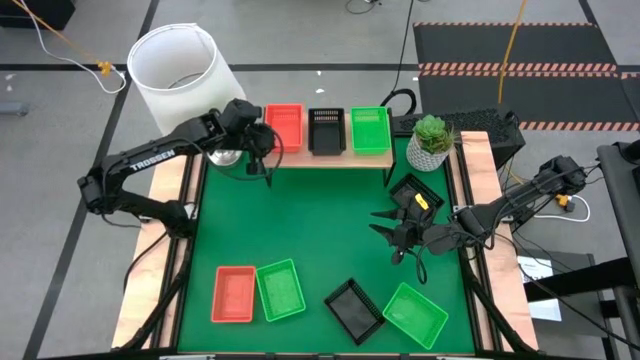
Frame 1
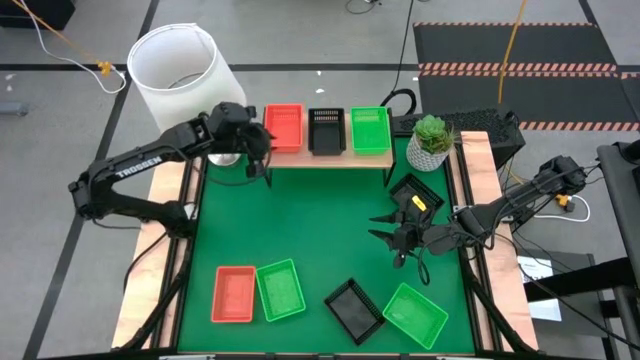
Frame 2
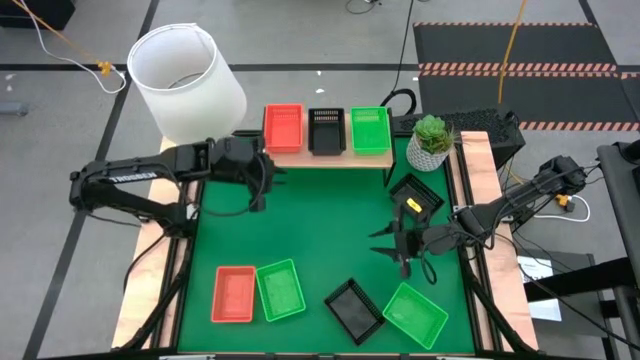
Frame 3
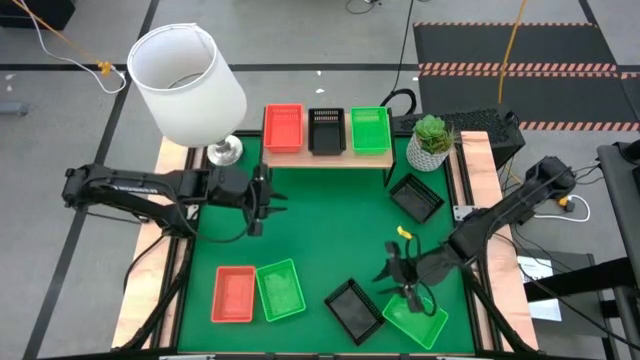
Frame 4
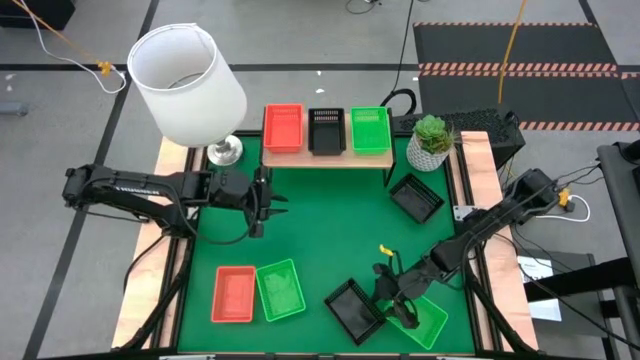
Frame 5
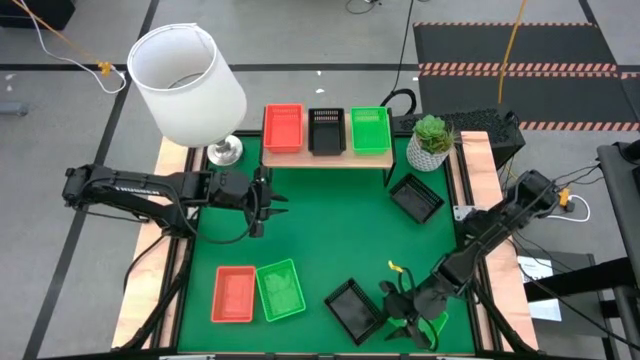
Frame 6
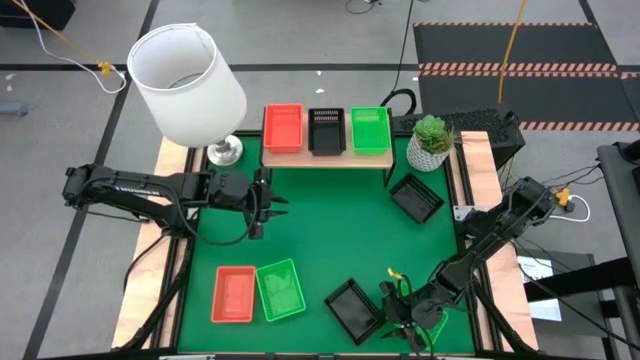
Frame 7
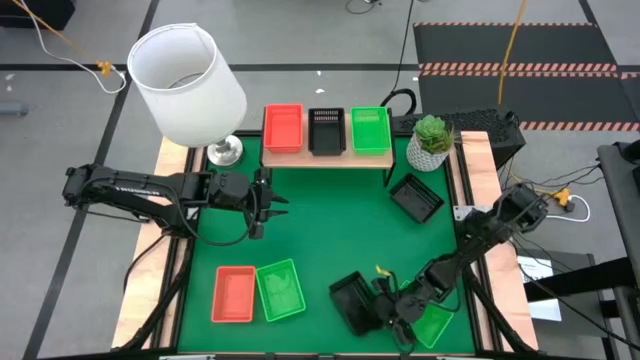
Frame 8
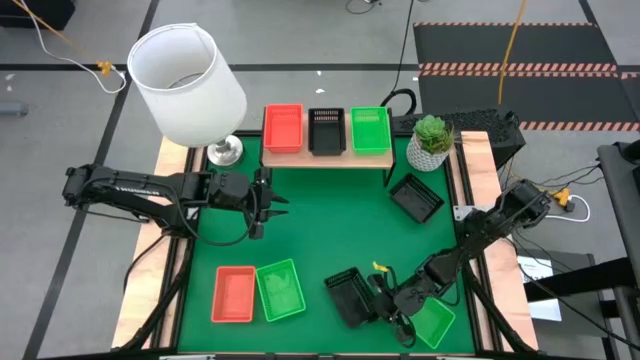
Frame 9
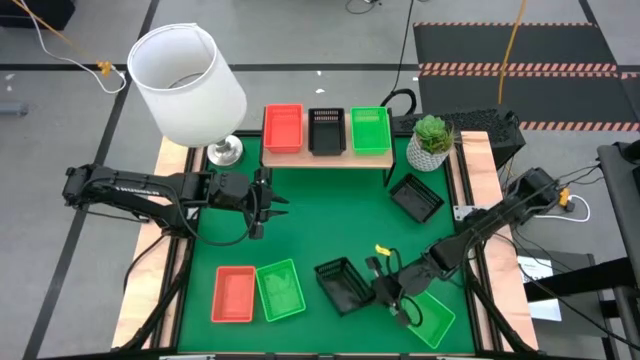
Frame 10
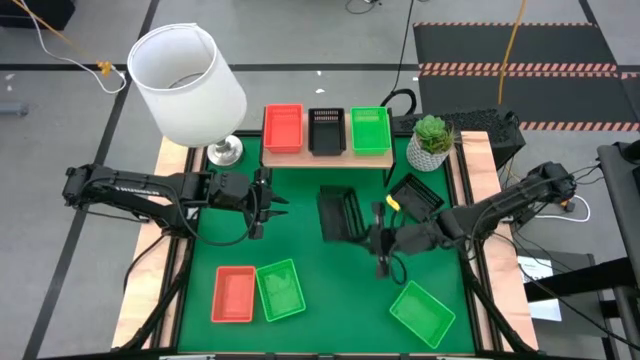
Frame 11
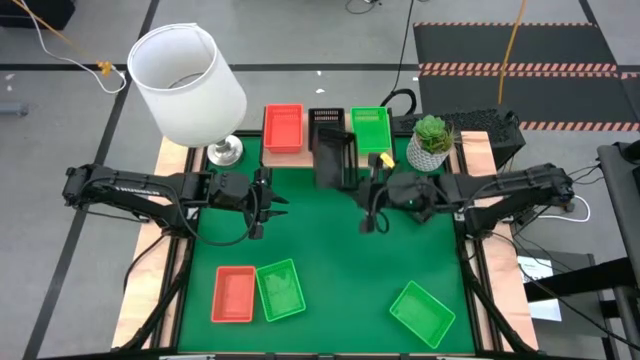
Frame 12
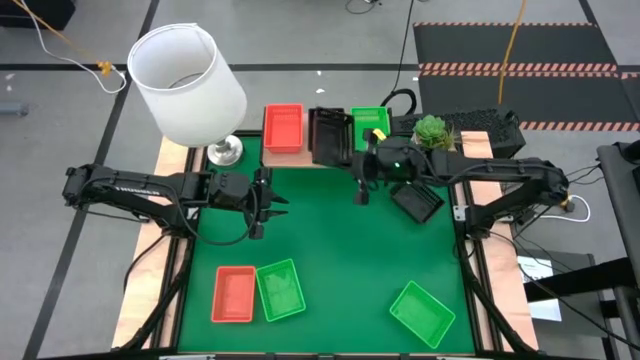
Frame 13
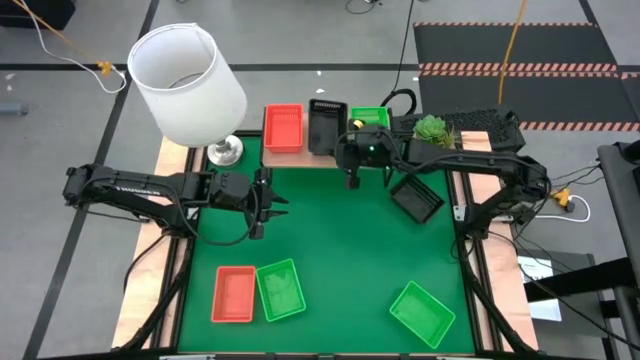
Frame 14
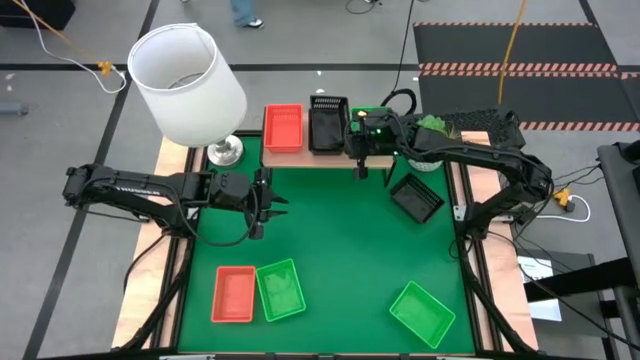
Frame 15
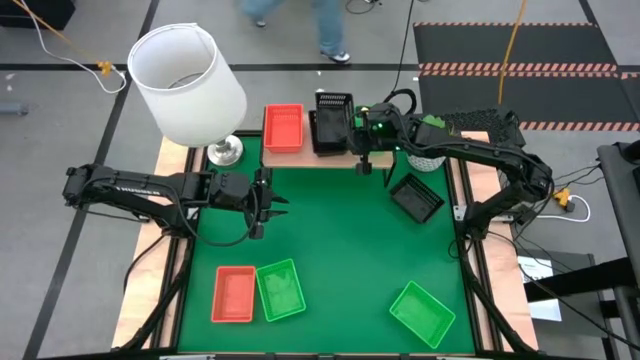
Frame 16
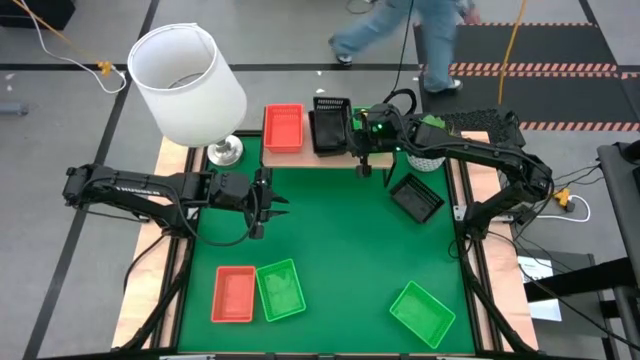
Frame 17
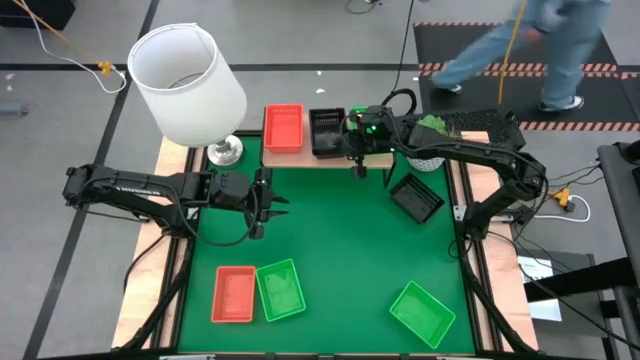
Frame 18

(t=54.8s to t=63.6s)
Task: Stack baskets on shelf by color
Stack the bottom black basket into the black basket on the shelf

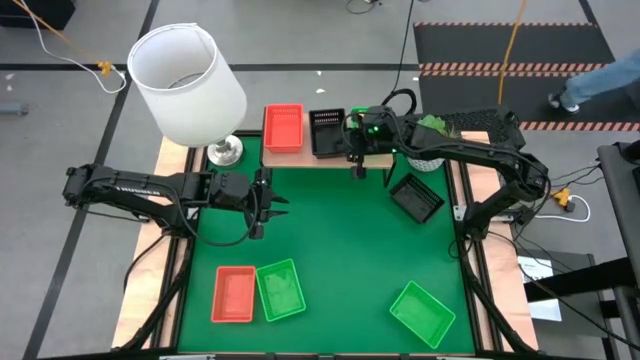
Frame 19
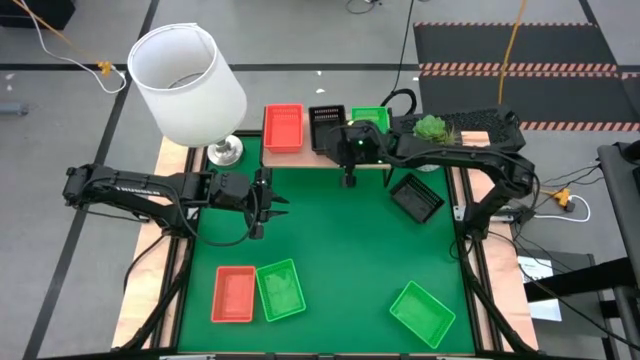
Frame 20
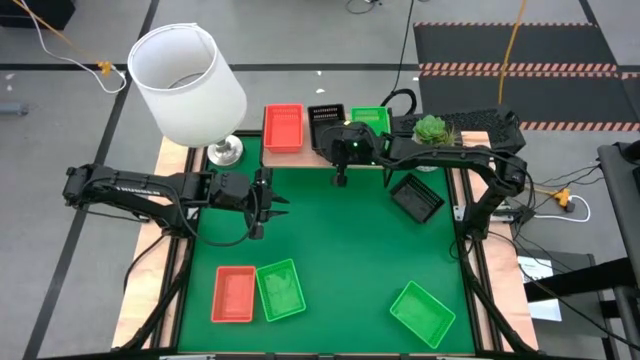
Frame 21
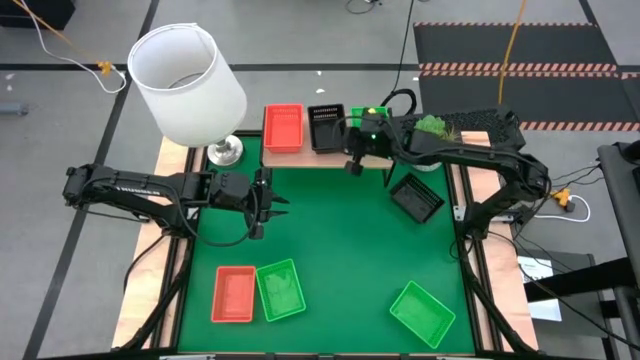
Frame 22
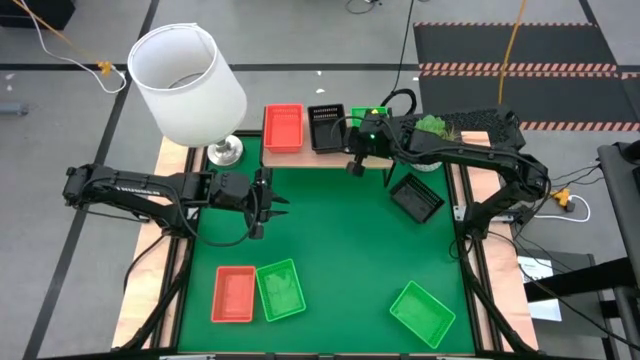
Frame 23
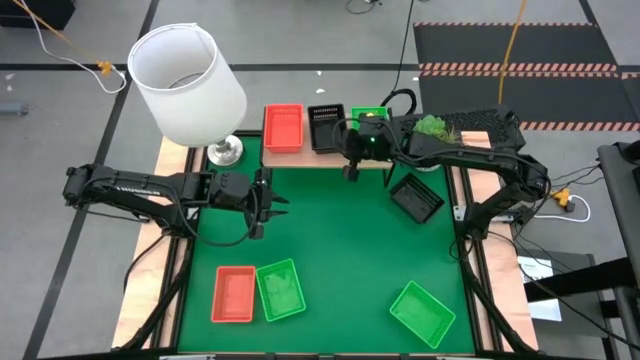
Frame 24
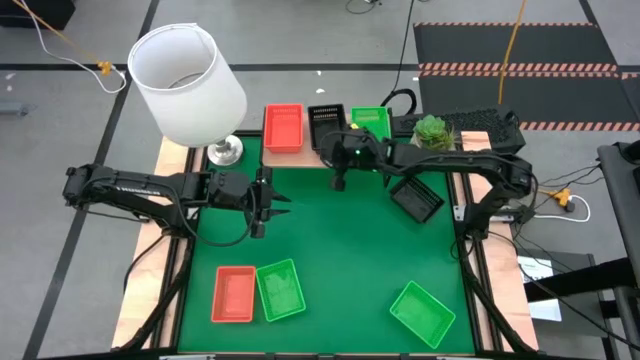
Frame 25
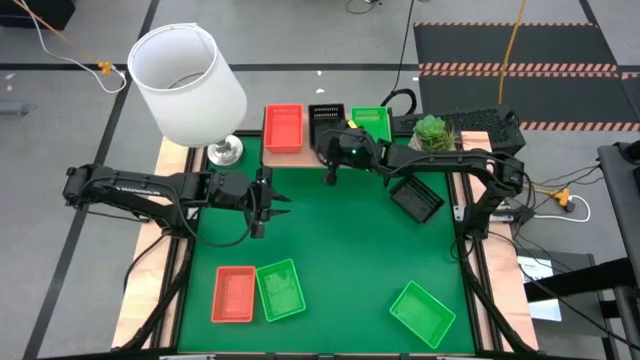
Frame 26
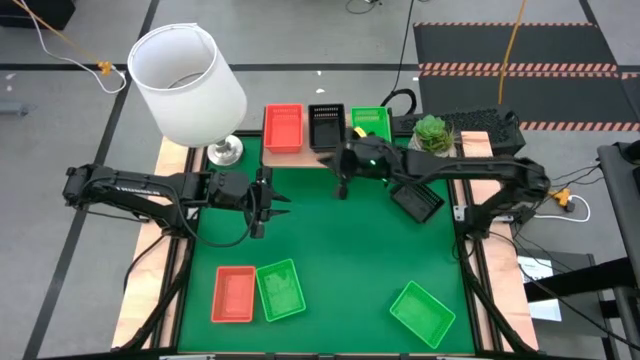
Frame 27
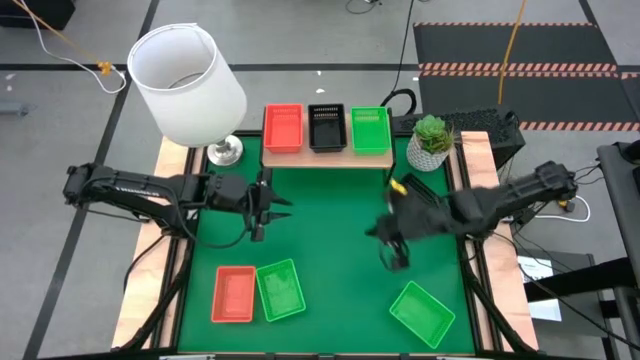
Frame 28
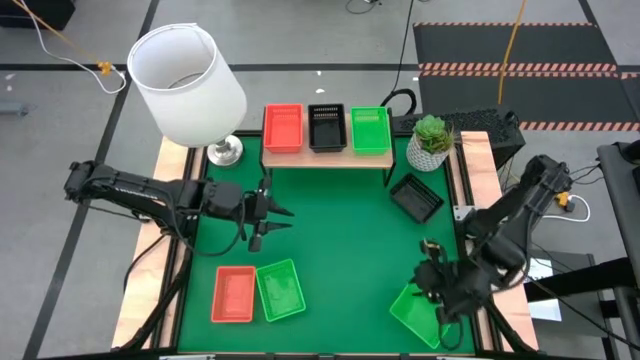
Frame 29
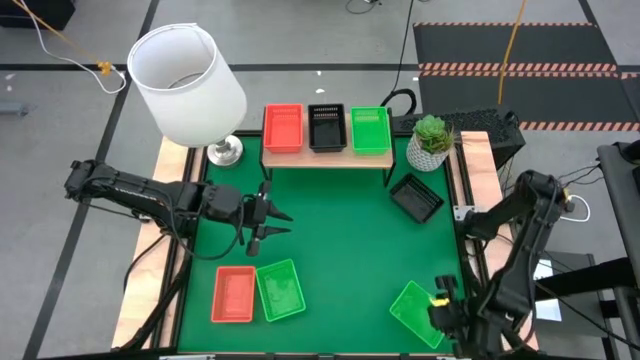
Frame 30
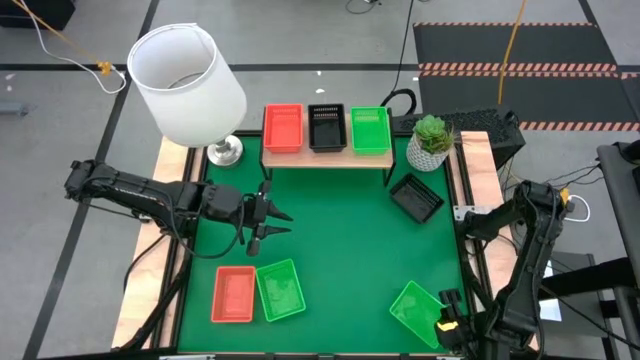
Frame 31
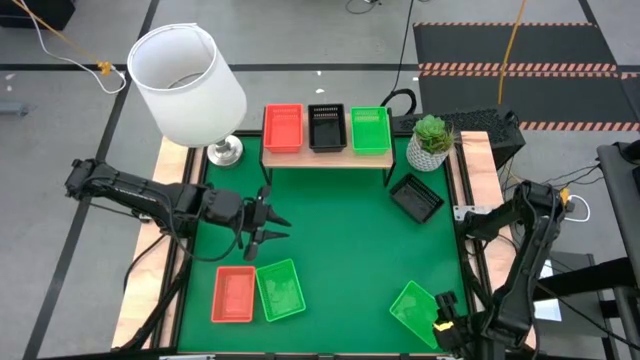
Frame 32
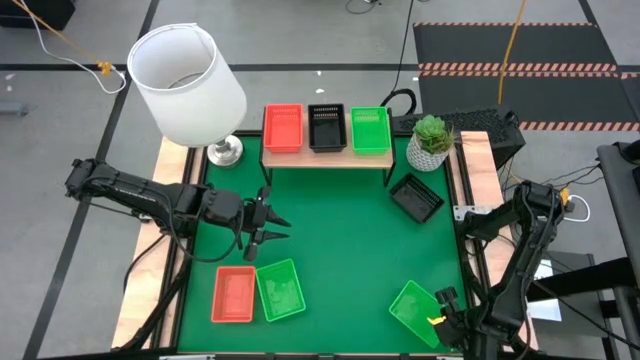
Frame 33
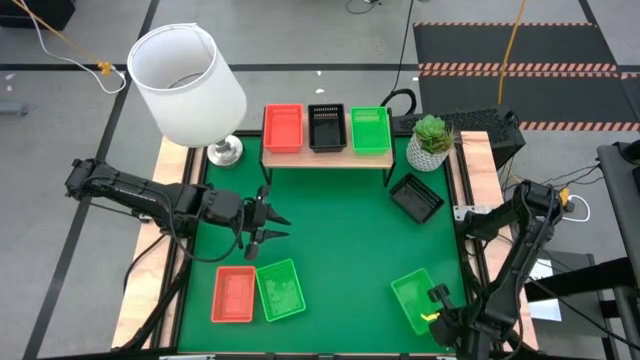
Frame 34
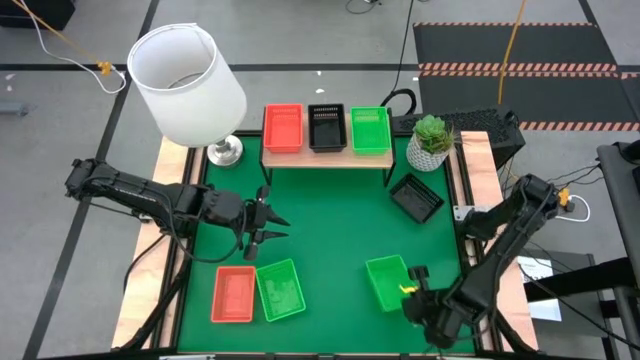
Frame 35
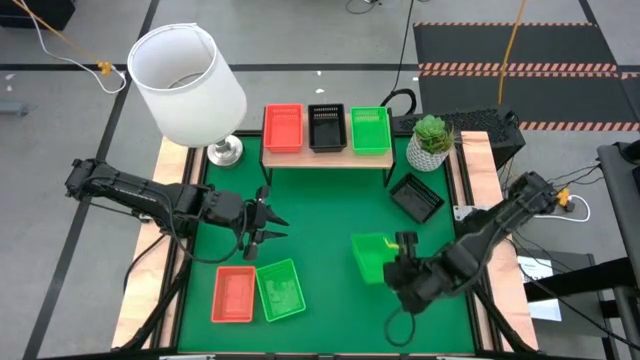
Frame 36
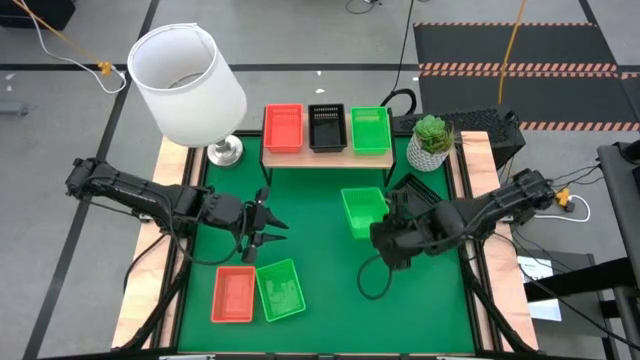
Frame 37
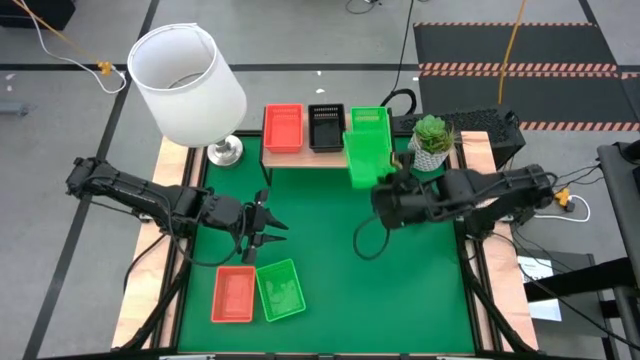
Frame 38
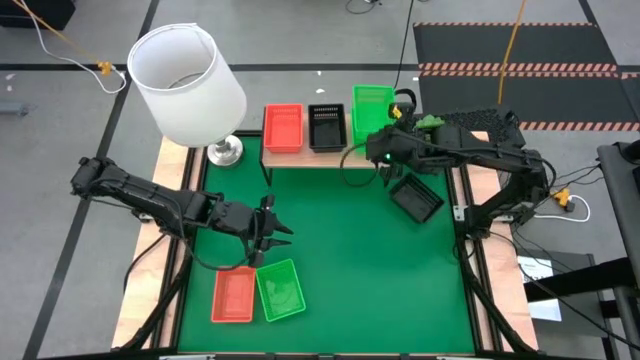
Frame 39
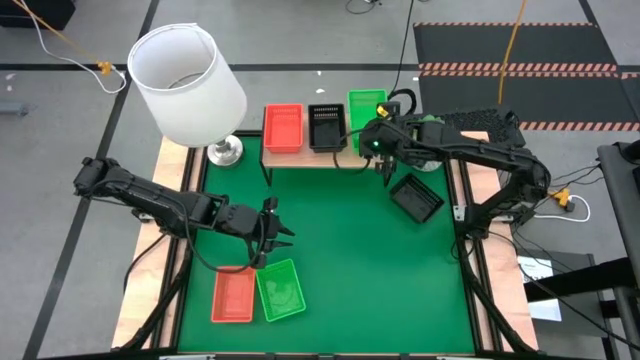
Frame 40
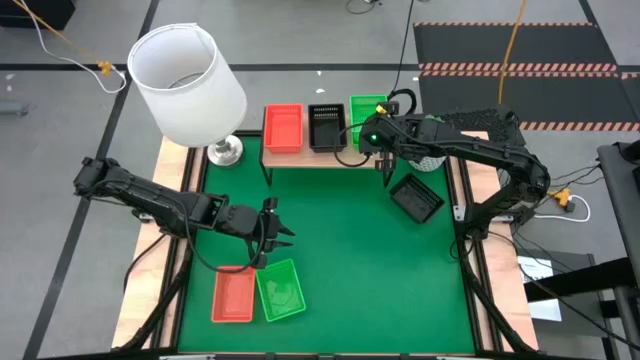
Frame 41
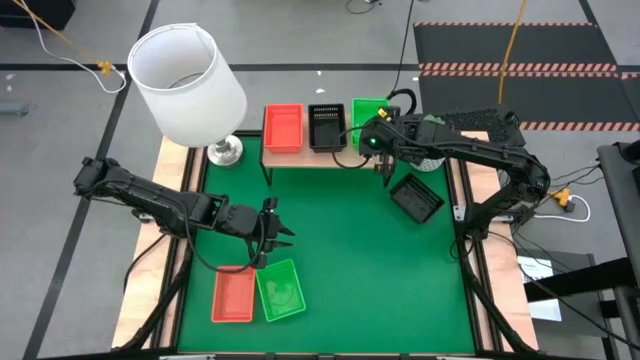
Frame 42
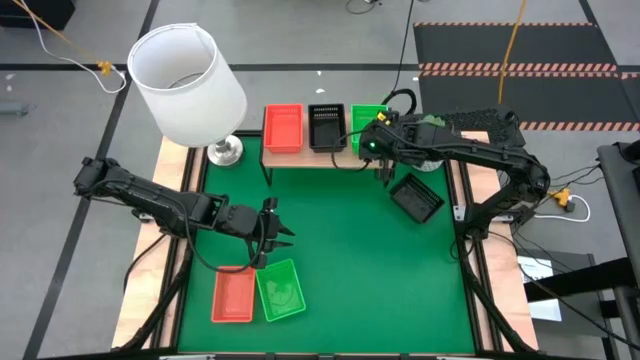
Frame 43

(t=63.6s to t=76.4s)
Stack the right green basket into the green basket on the shelf

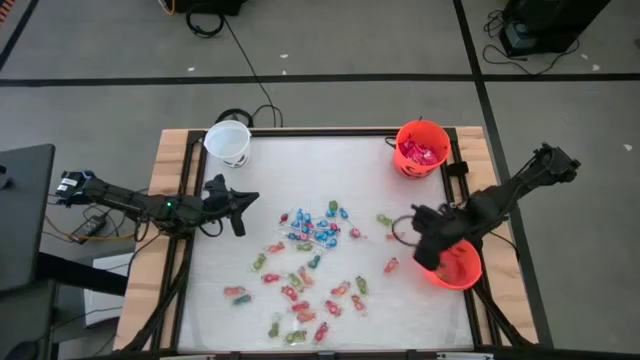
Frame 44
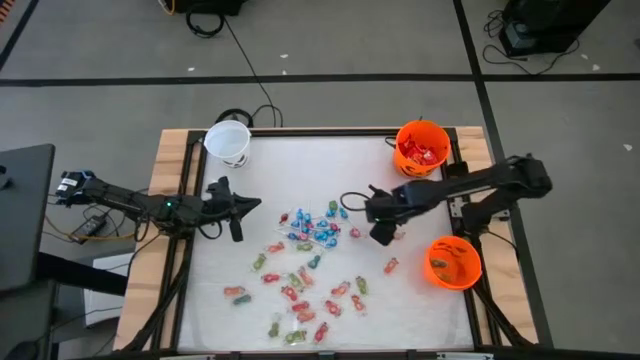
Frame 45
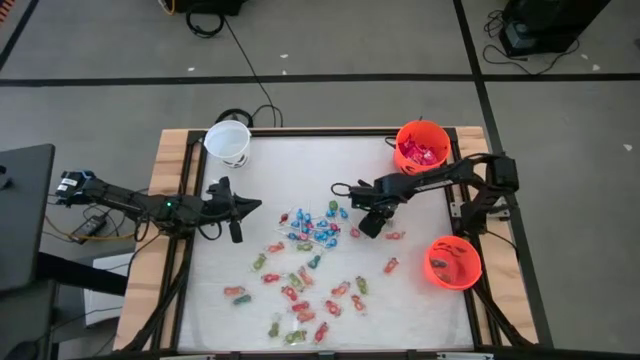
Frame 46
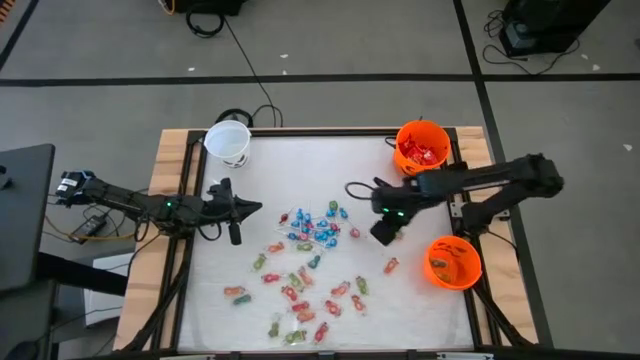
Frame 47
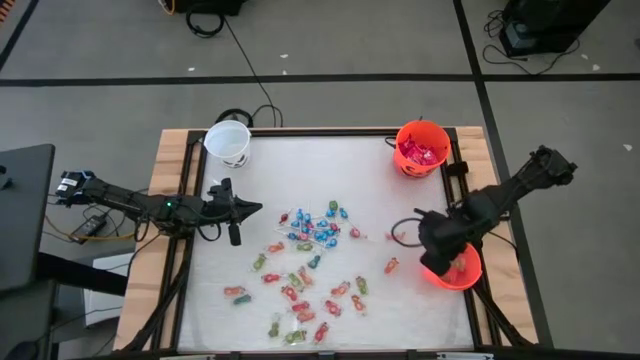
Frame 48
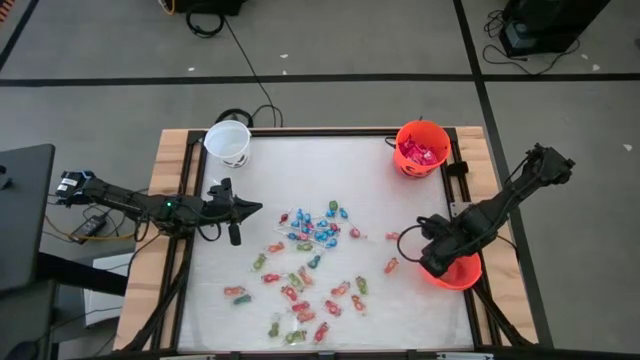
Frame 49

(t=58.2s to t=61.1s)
Task: Sort candy by brand, put in halloween buckets
Put the green gummy into the bottom orange bucket
